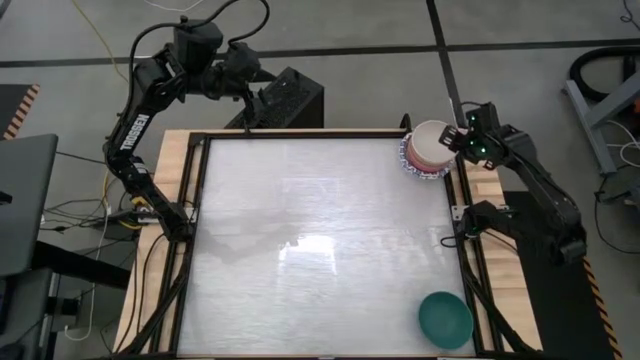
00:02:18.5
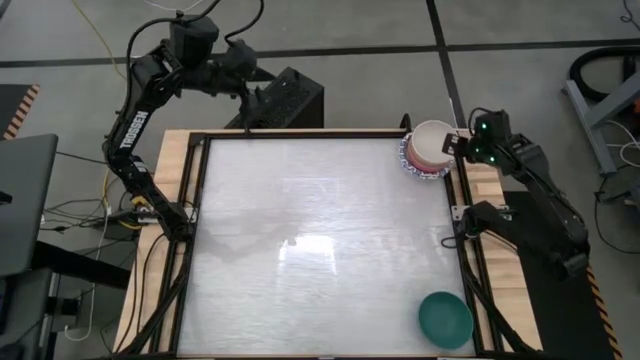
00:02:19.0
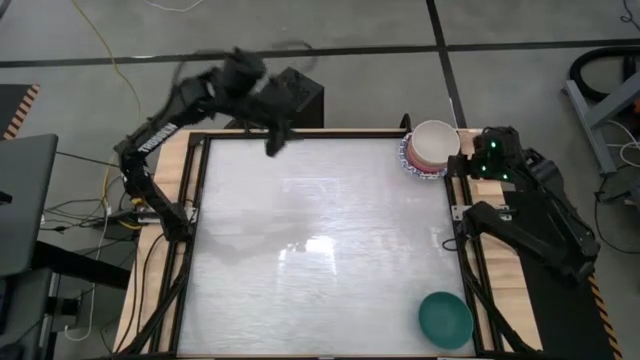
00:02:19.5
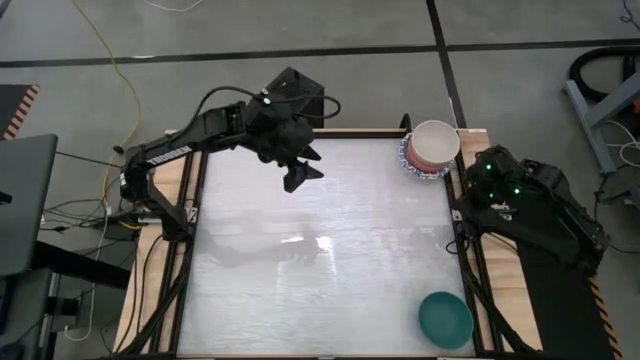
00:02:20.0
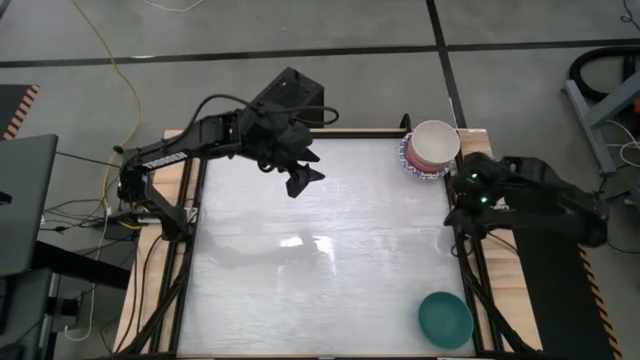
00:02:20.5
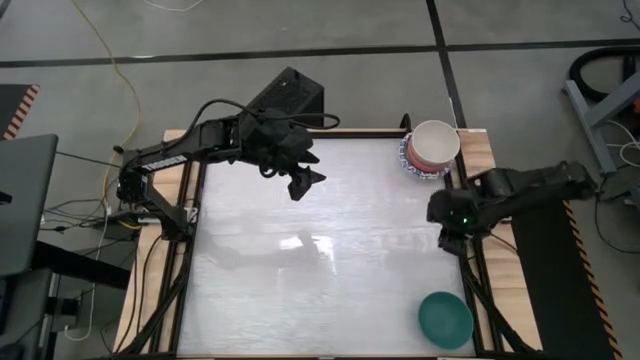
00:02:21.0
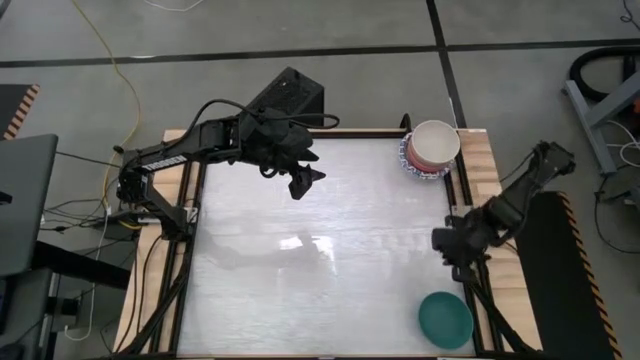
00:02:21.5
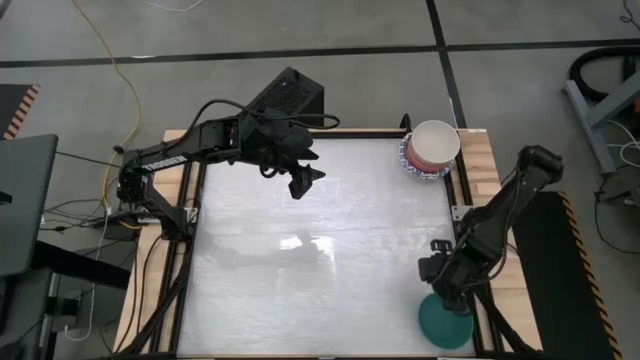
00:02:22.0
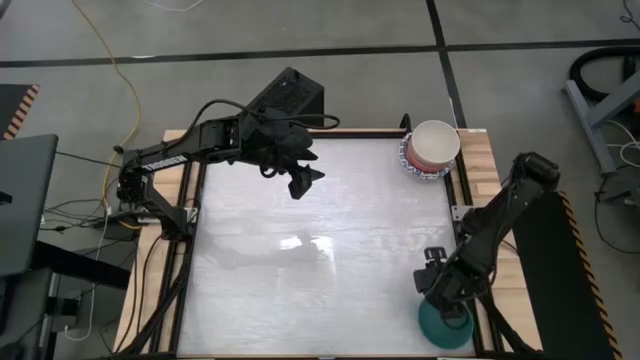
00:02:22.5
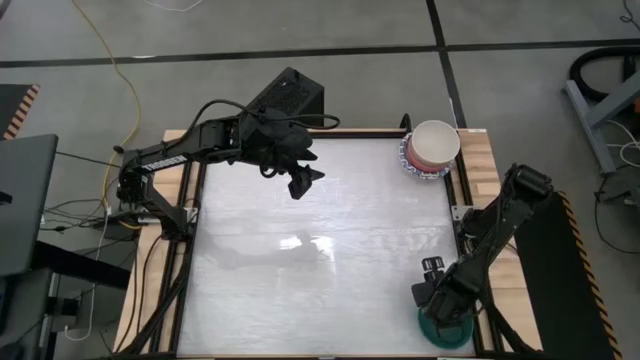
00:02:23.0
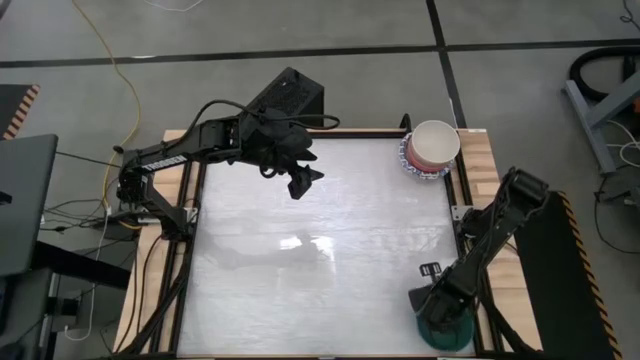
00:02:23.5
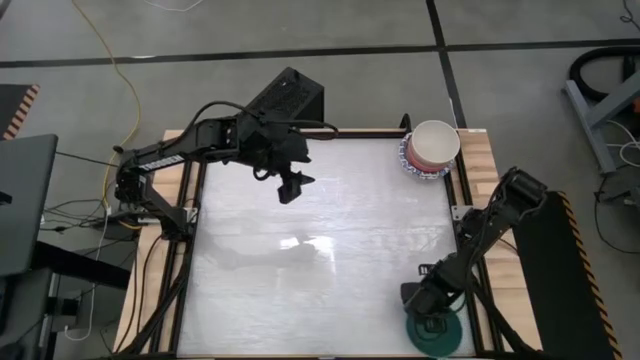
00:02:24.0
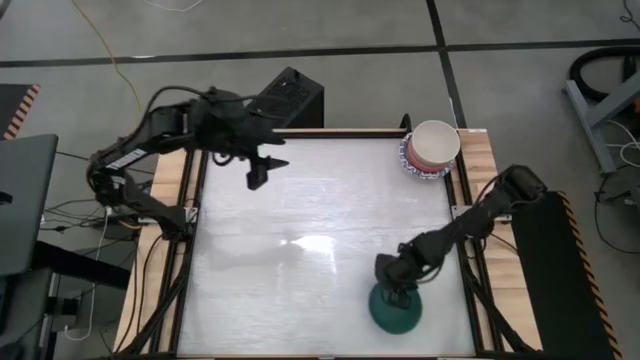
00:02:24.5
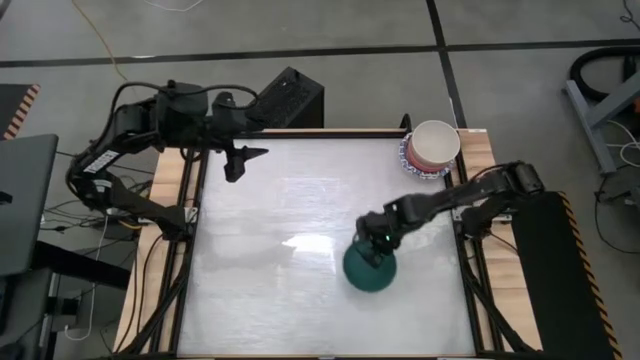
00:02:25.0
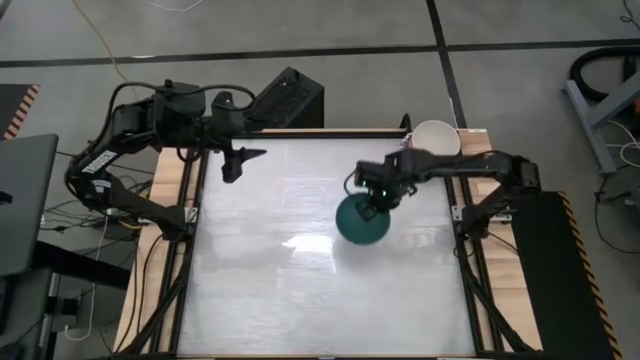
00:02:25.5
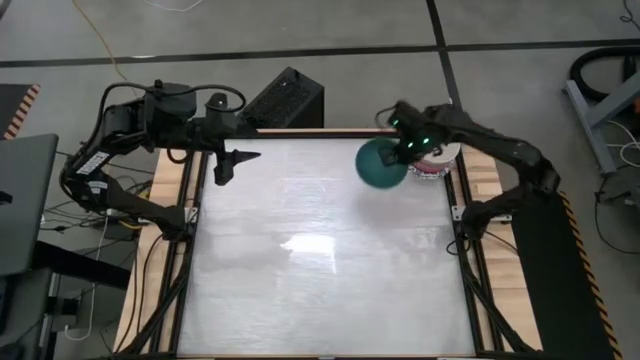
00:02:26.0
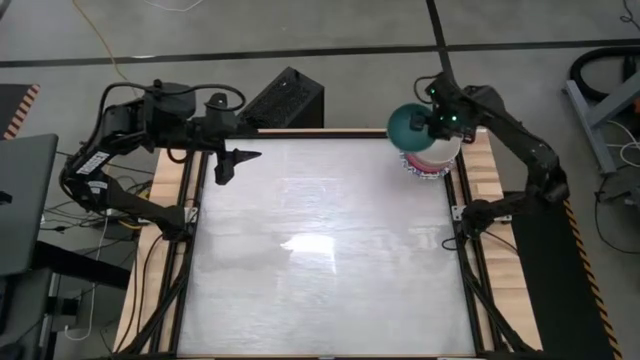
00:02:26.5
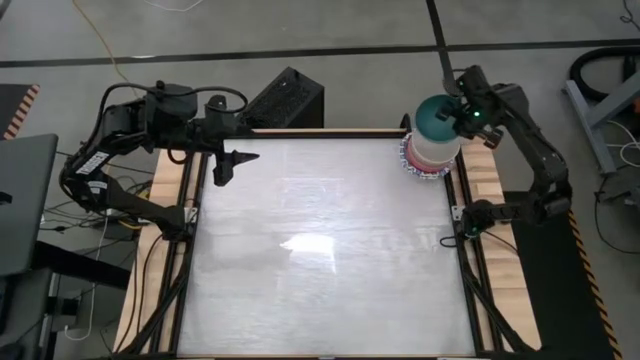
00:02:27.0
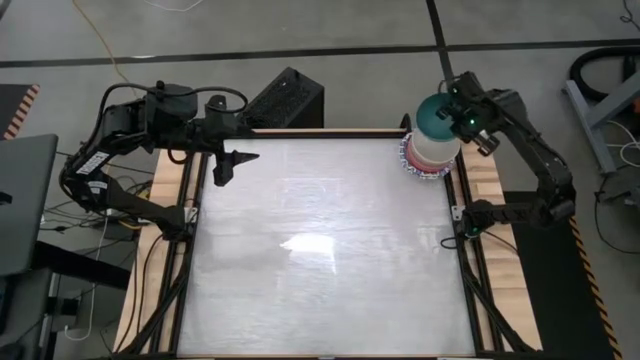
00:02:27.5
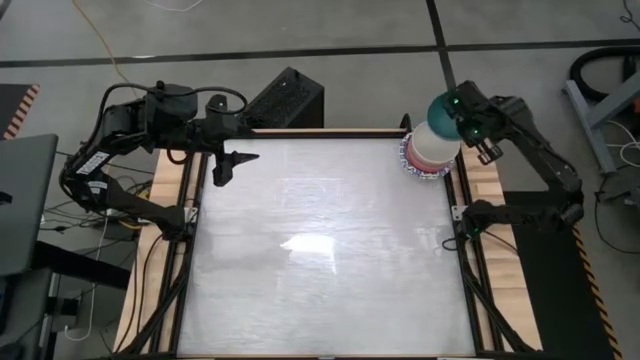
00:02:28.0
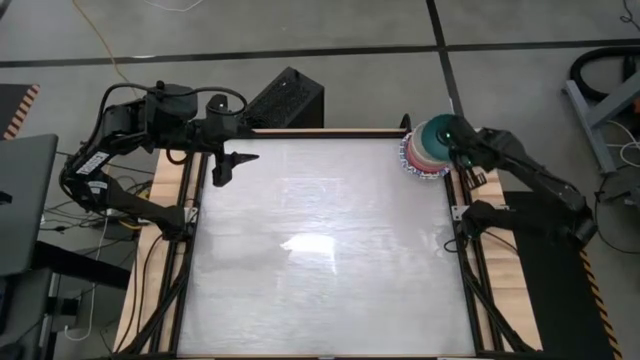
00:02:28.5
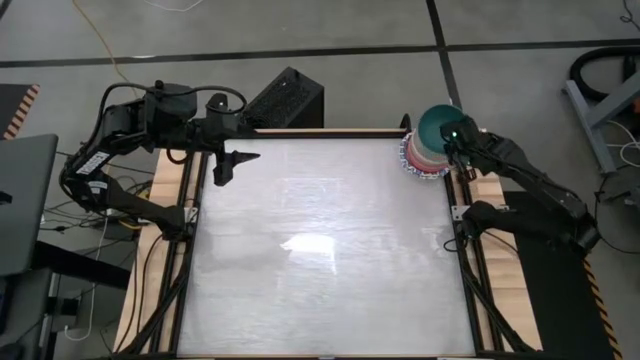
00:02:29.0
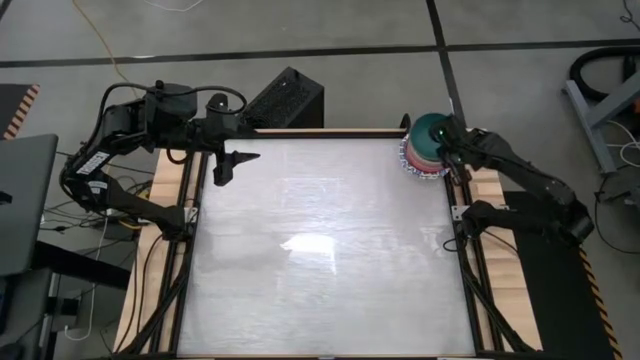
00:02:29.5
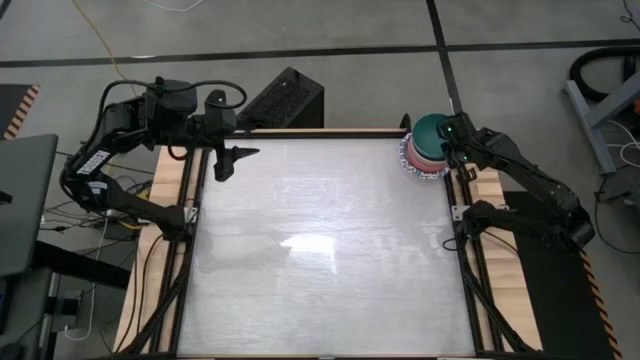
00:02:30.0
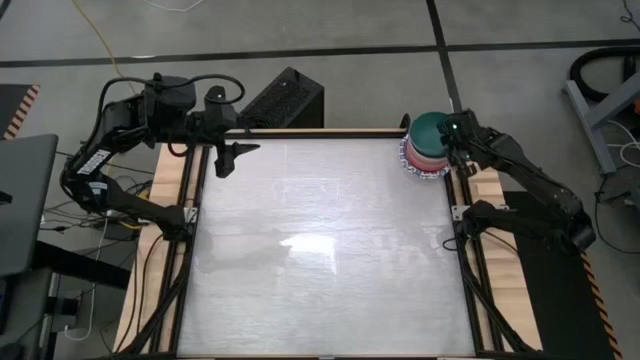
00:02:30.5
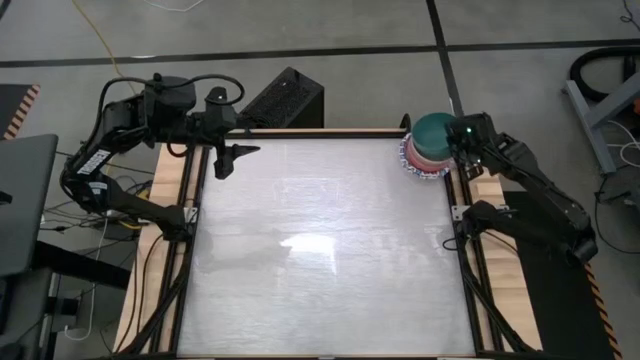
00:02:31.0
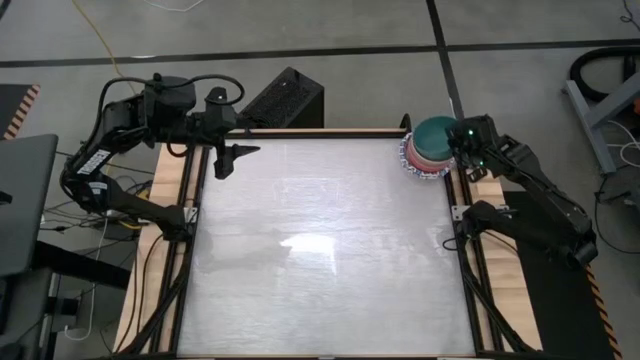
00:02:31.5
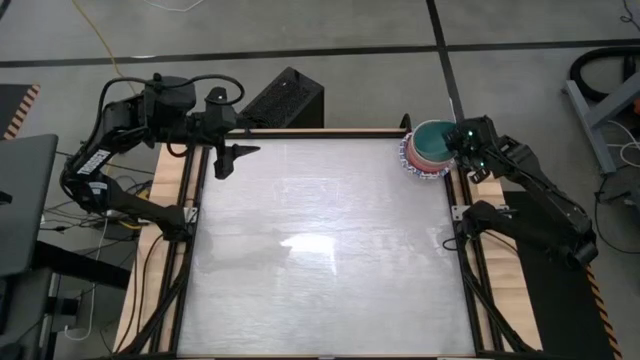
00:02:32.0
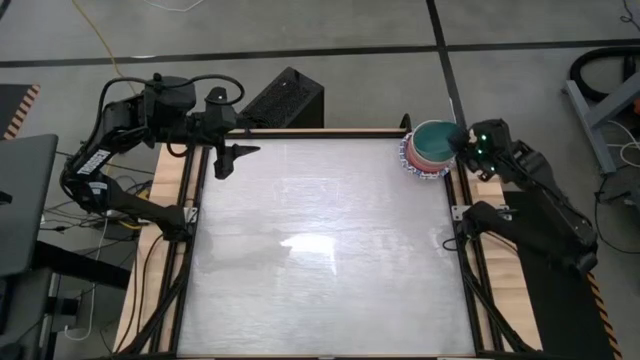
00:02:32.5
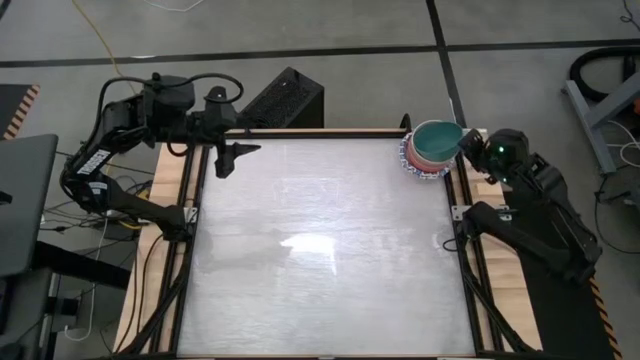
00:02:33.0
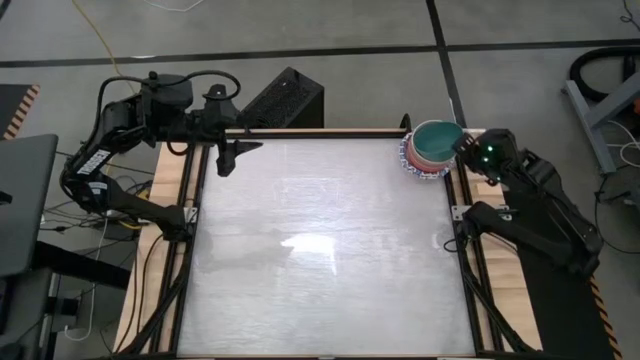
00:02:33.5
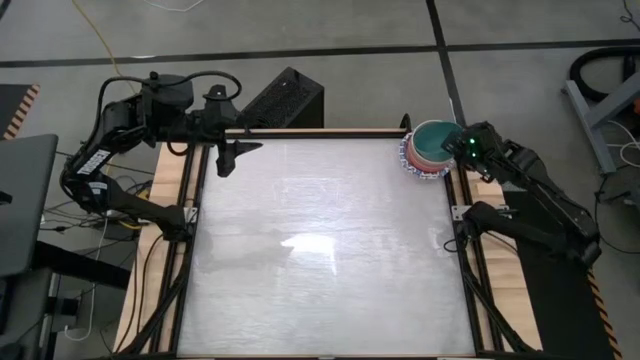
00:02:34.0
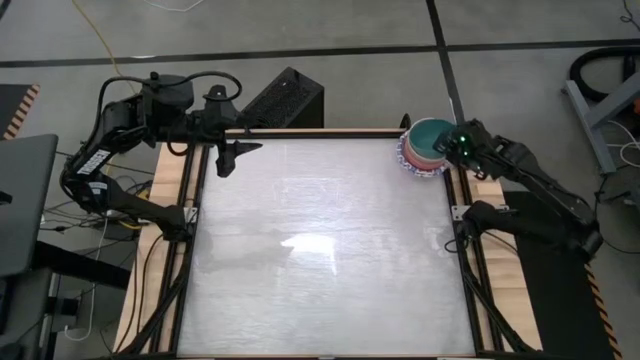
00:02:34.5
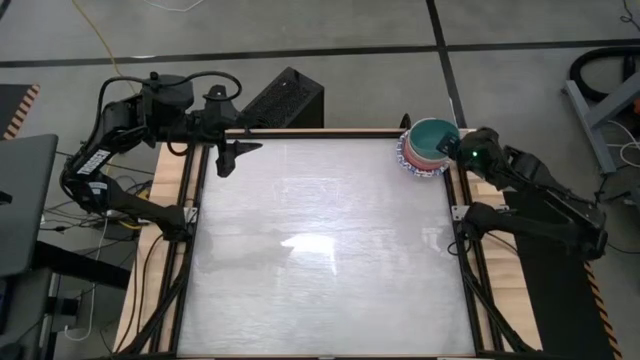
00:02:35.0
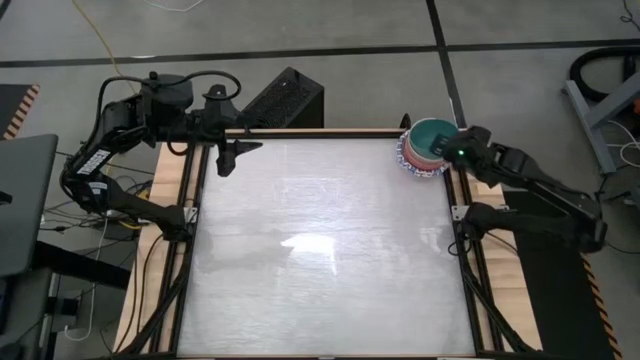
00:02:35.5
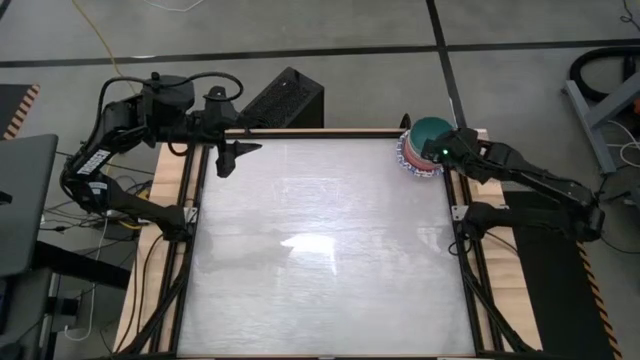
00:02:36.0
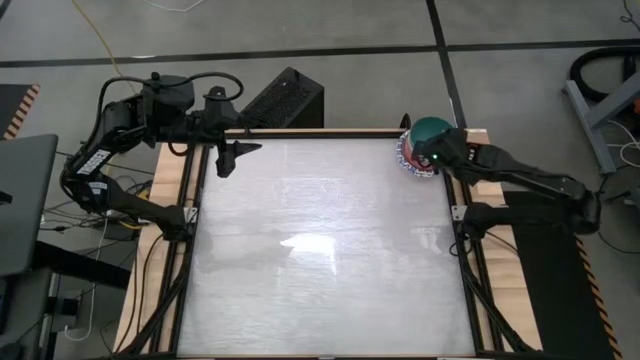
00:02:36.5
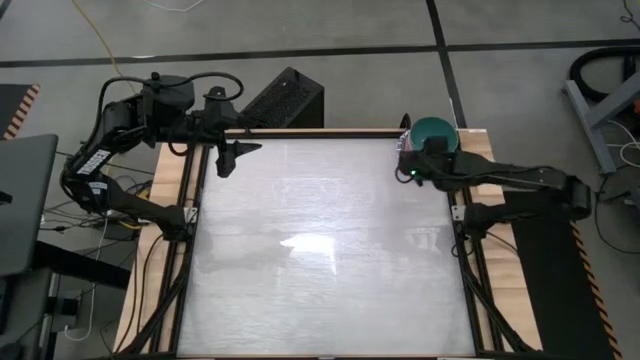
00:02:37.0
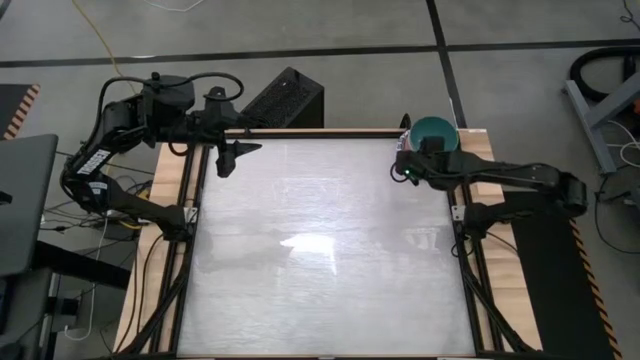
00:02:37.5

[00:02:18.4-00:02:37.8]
Stack the green bowl on top of the white bowl
